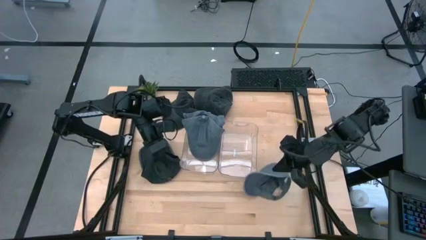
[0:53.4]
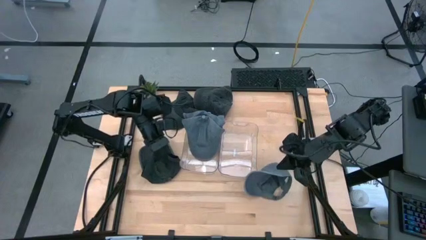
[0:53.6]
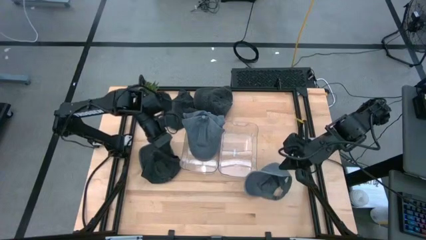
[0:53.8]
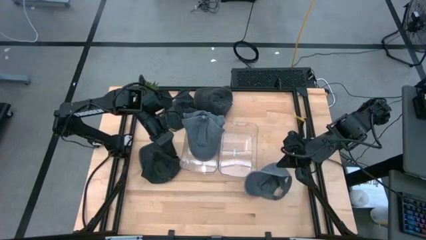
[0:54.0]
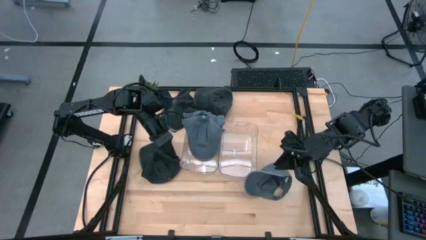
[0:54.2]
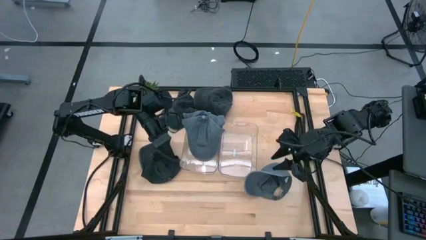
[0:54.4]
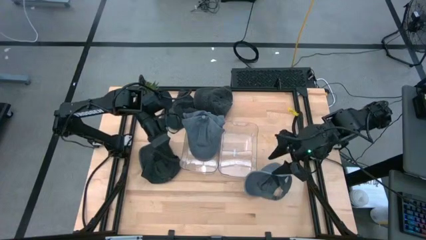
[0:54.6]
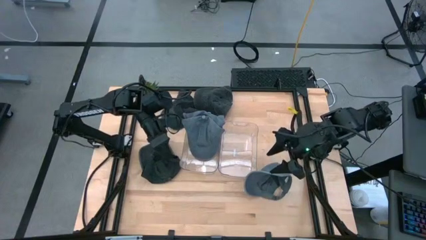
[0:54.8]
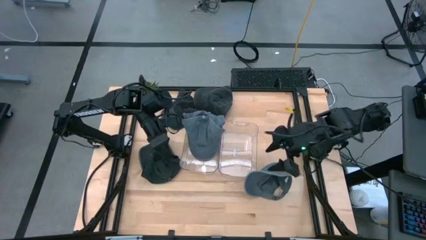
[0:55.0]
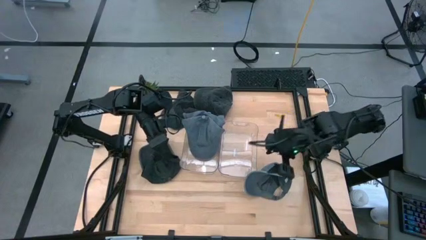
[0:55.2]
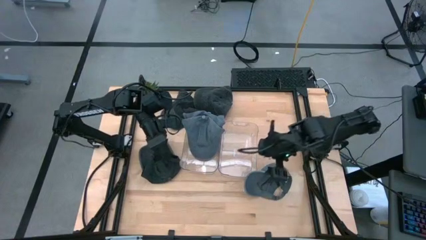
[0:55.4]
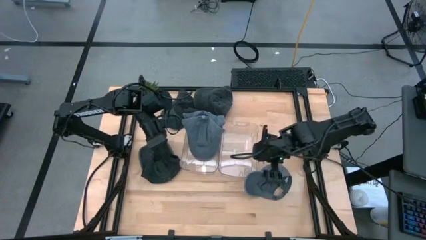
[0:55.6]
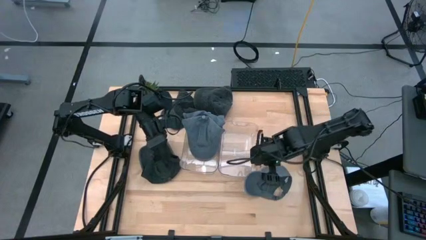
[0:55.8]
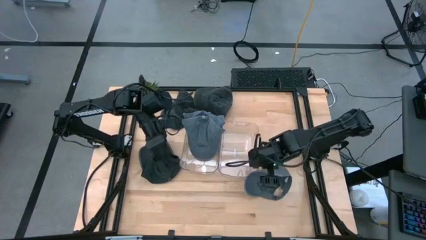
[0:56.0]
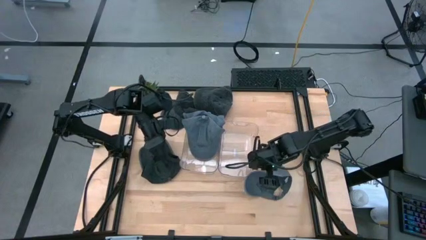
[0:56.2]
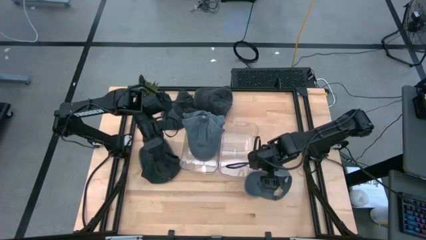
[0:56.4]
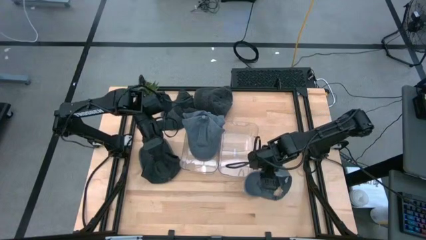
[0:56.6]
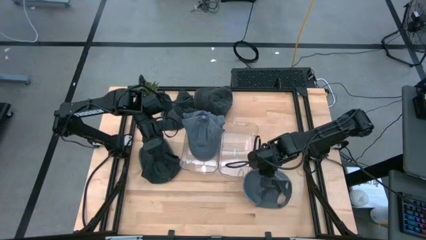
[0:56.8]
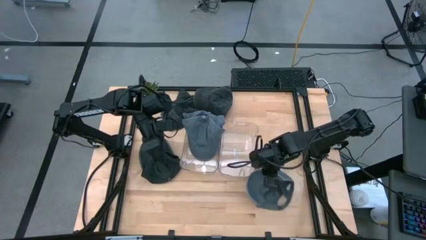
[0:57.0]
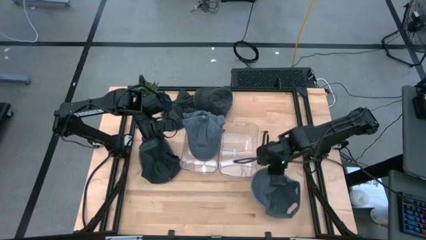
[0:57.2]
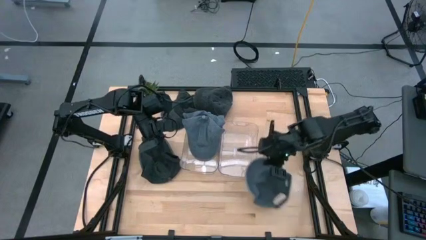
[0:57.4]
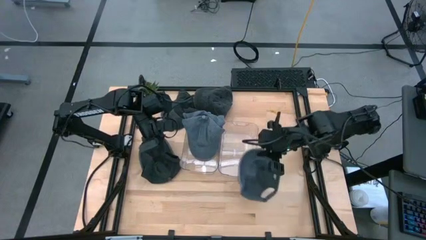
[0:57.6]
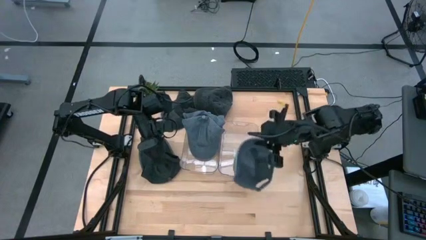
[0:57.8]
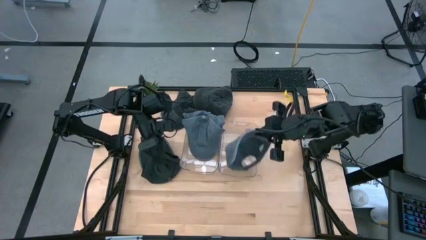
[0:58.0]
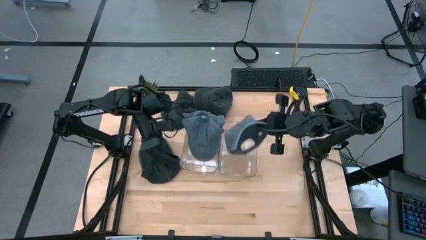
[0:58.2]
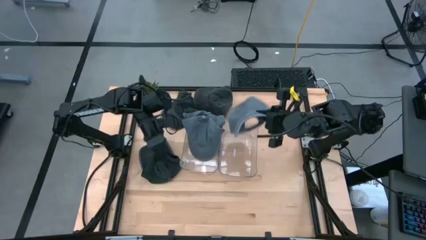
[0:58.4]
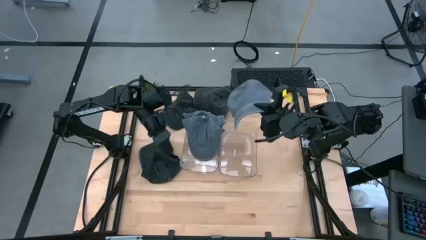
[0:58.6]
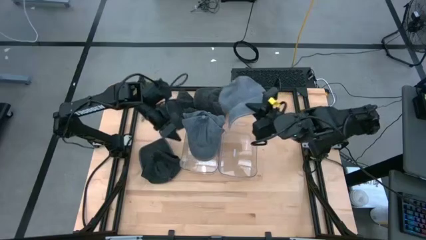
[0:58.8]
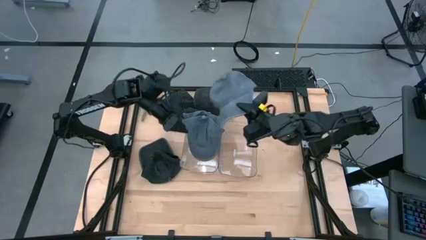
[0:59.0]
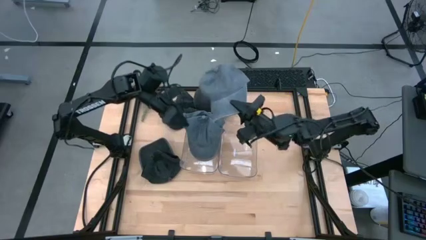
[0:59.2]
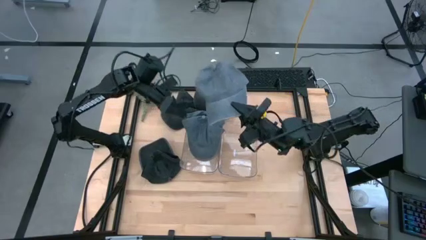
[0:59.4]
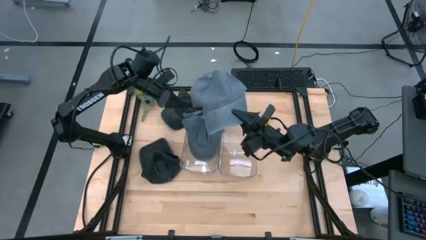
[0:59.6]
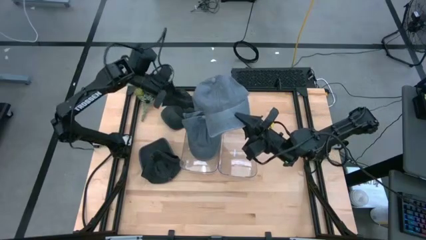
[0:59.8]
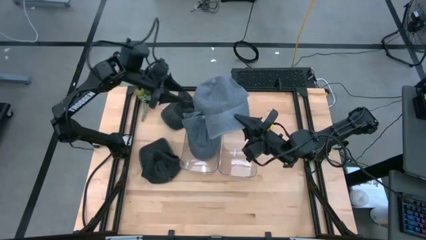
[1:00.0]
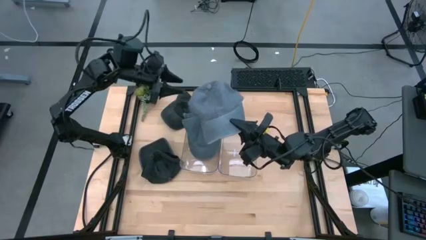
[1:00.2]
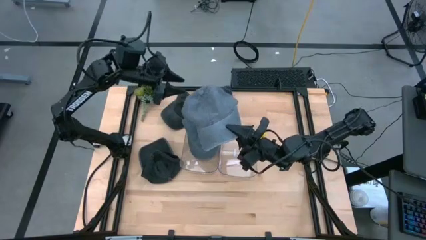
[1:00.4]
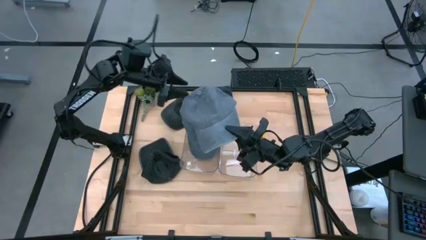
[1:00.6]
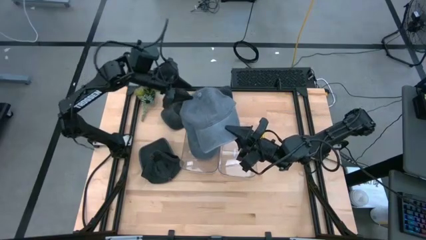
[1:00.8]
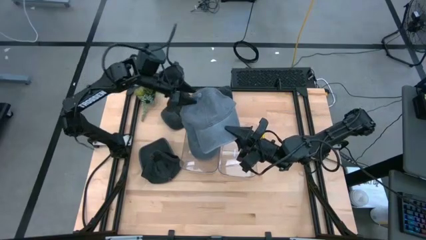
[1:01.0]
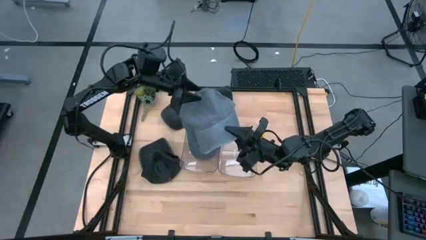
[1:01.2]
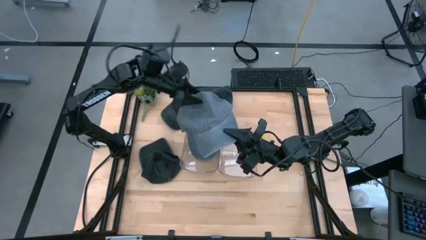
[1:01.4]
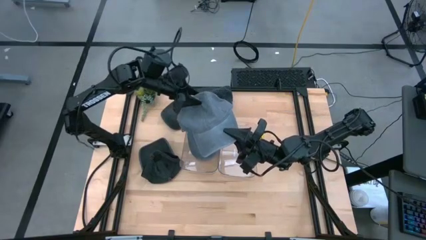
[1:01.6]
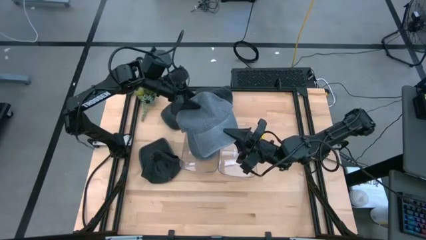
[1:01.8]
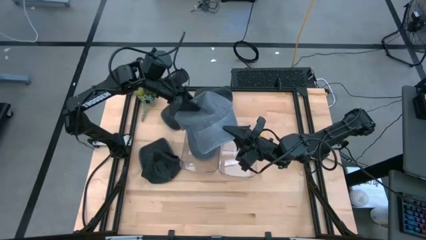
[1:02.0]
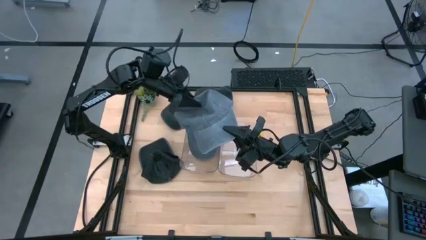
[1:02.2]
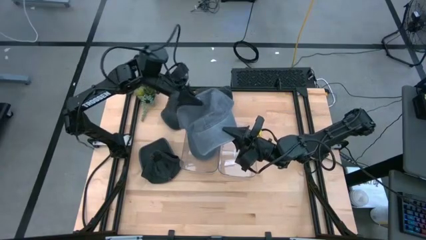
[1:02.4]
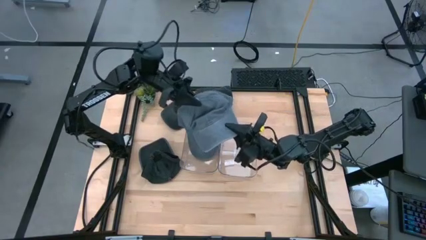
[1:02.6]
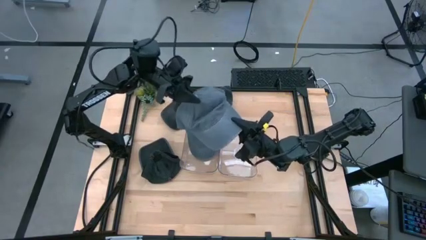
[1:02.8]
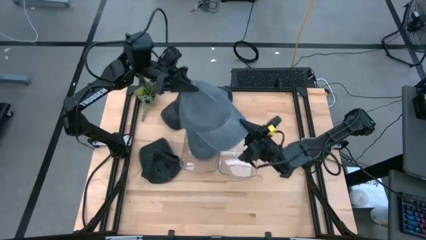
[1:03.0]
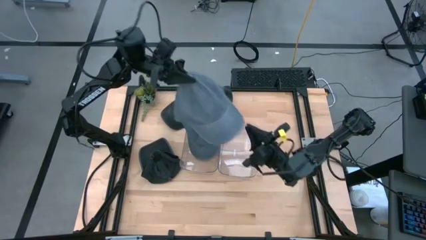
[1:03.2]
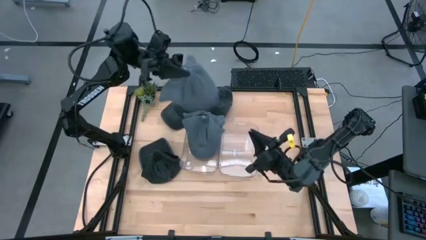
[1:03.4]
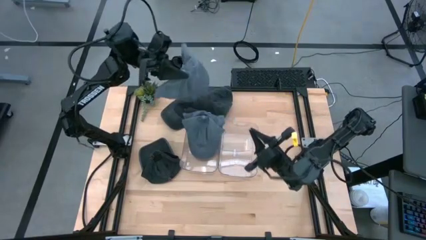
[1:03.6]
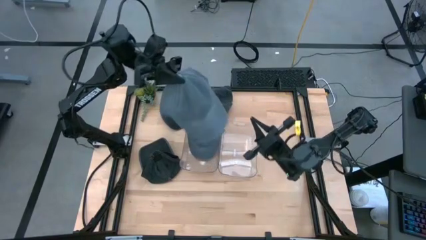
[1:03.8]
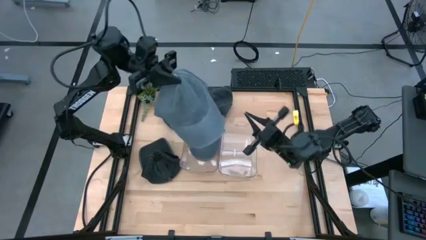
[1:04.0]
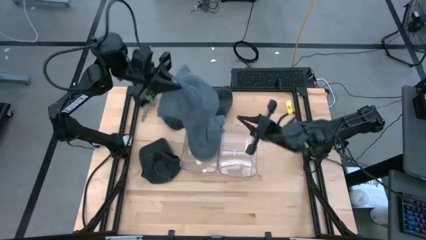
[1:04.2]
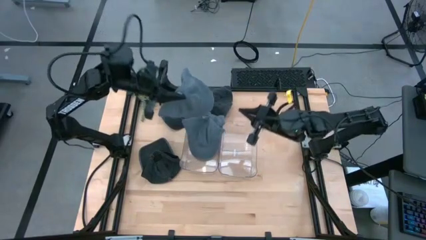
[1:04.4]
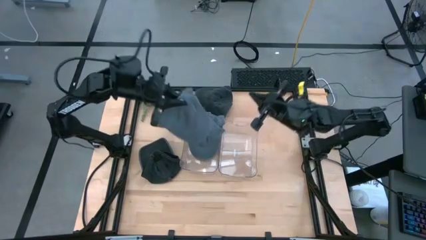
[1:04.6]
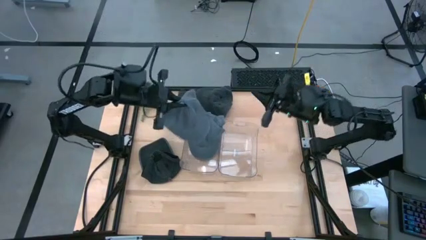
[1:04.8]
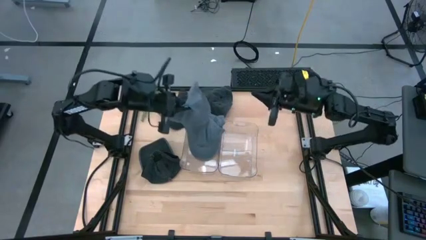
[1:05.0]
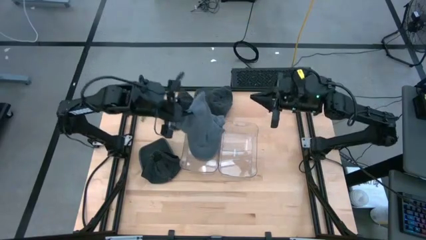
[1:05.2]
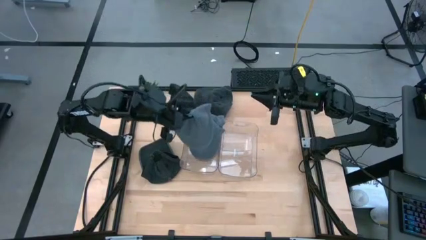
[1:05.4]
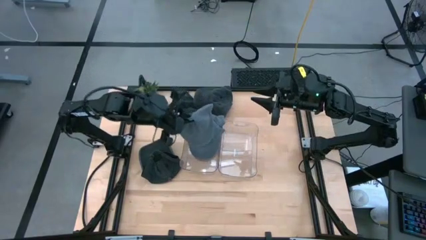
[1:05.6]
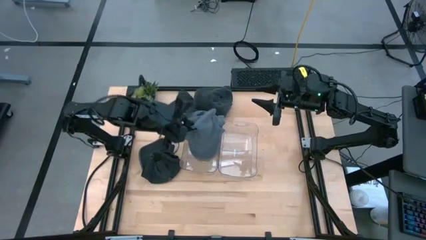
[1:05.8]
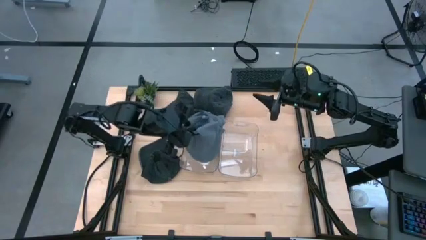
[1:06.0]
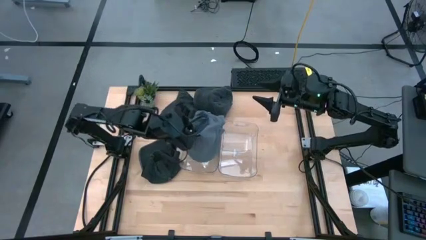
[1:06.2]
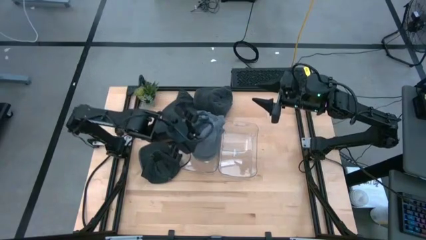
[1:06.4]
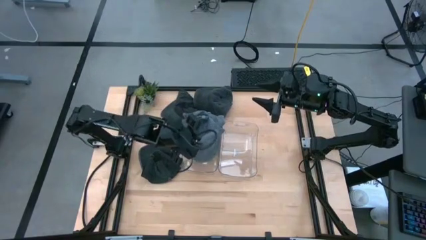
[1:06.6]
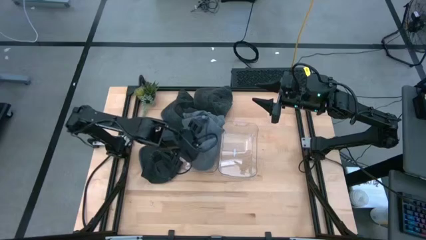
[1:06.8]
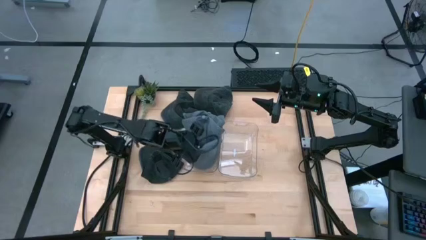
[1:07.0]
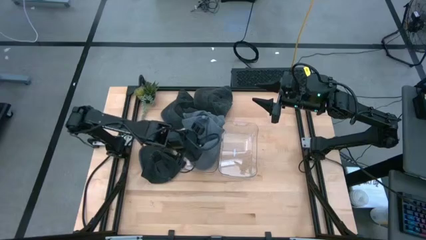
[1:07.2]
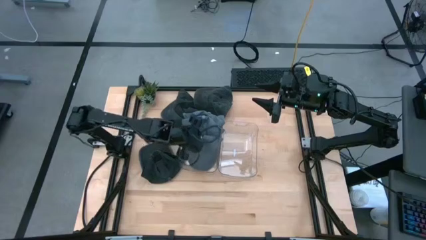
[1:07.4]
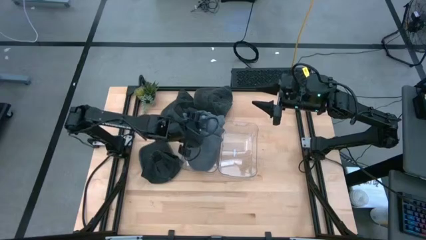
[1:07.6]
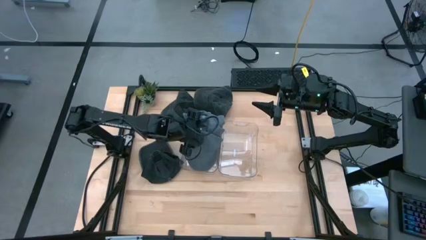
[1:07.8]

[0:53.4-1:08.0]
Task: Pick & Place hat
Put the gray cap into the left transparent bin
